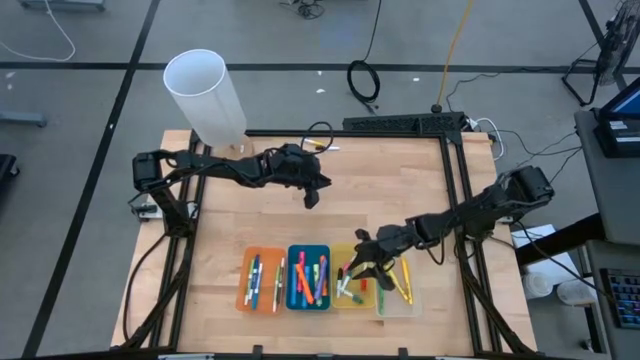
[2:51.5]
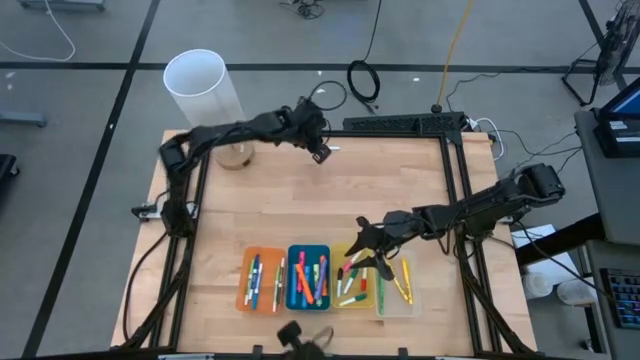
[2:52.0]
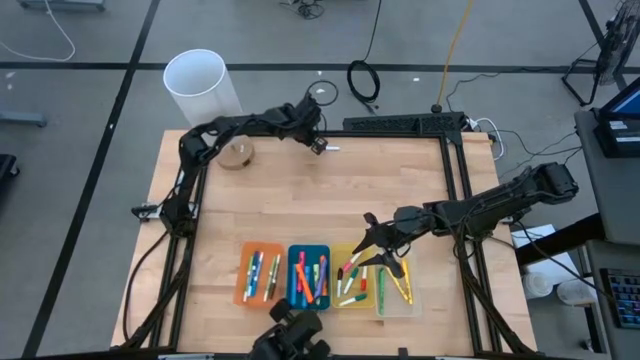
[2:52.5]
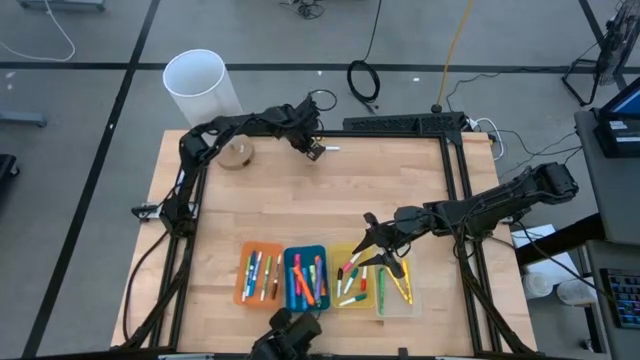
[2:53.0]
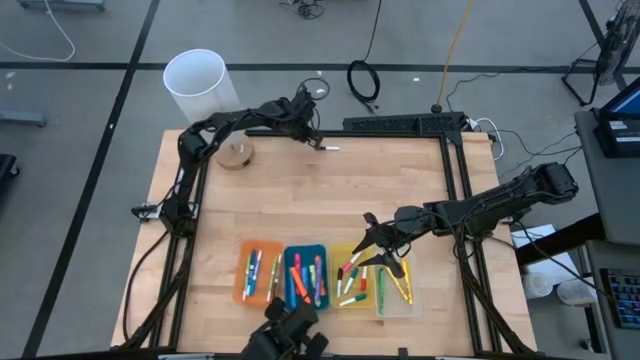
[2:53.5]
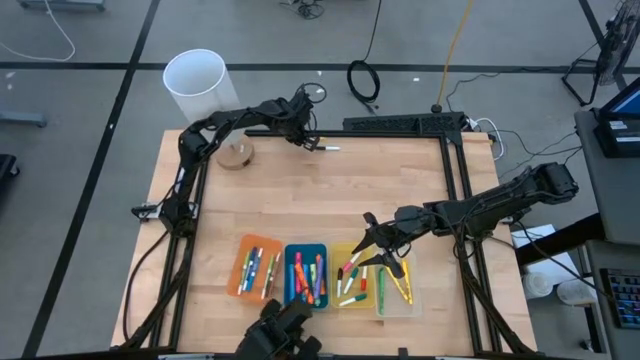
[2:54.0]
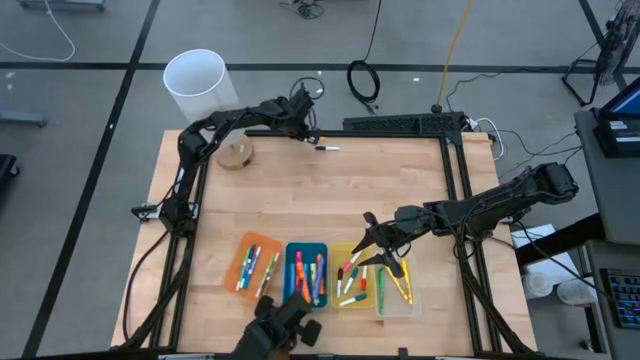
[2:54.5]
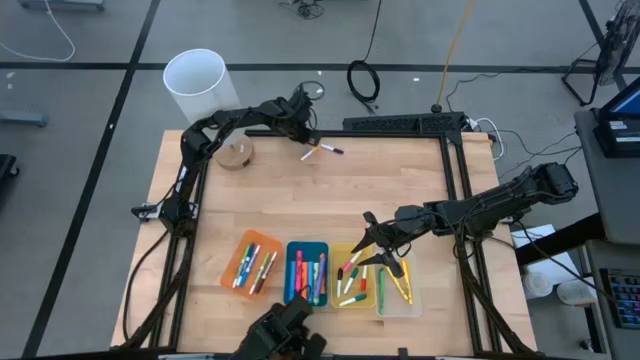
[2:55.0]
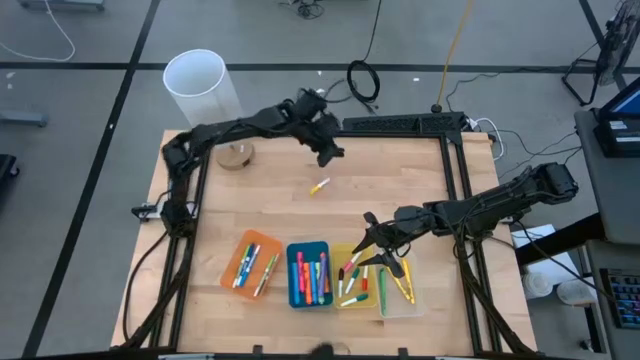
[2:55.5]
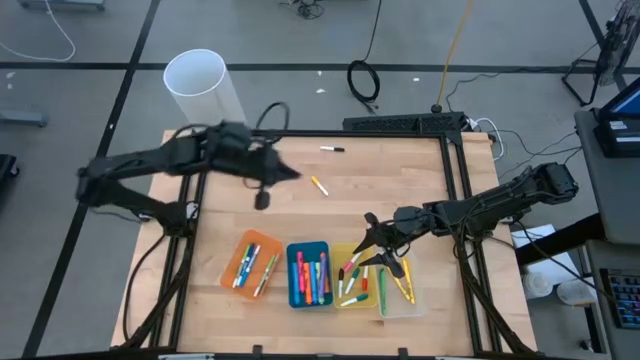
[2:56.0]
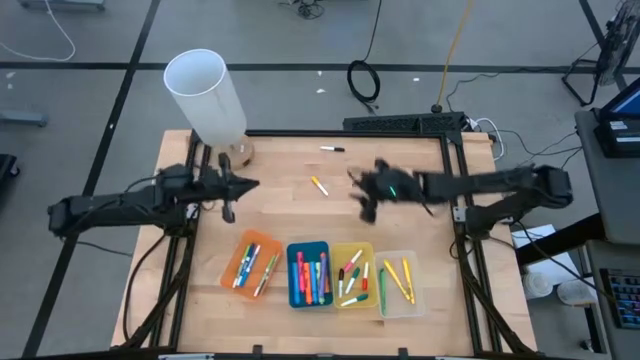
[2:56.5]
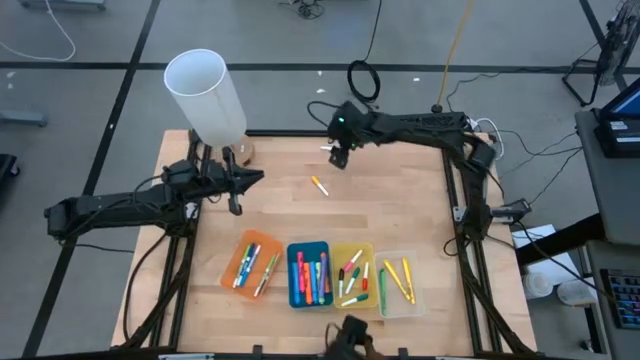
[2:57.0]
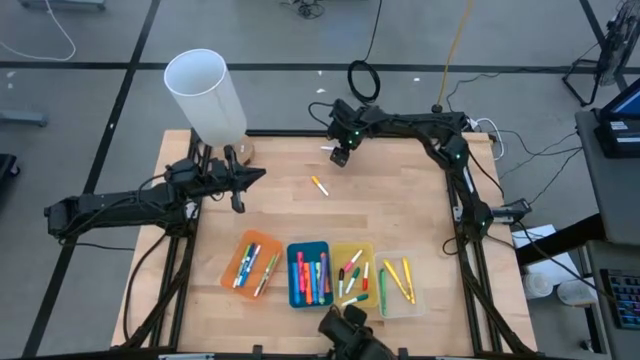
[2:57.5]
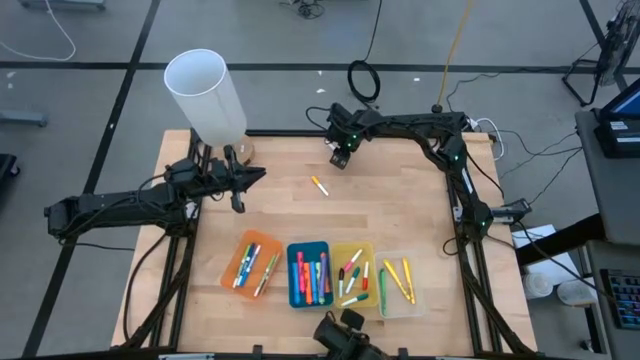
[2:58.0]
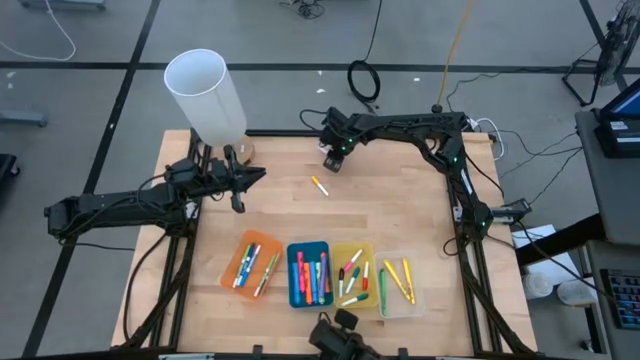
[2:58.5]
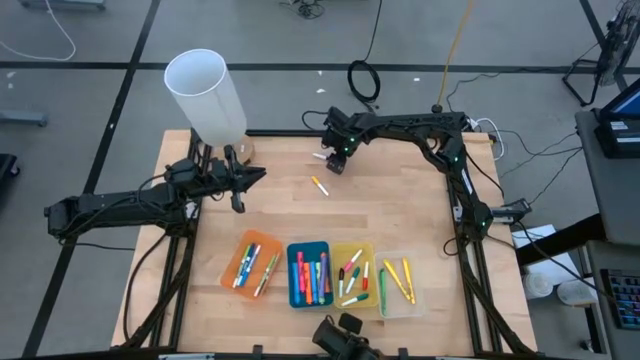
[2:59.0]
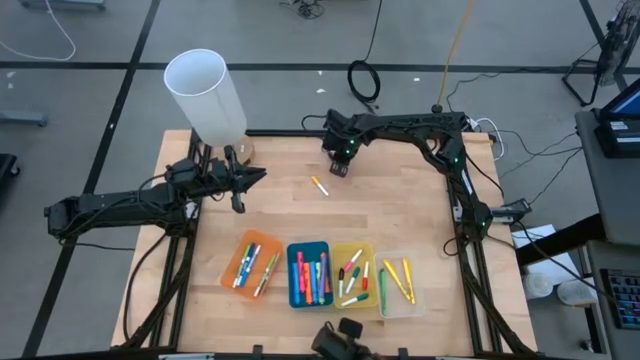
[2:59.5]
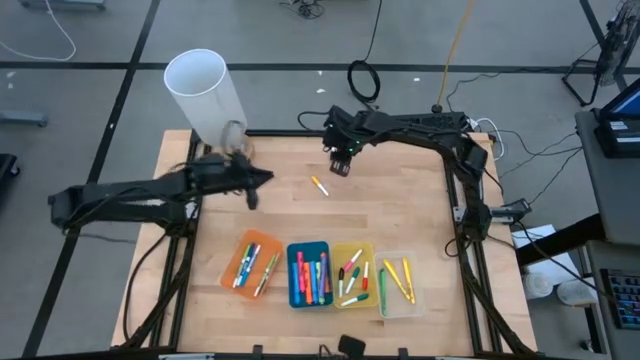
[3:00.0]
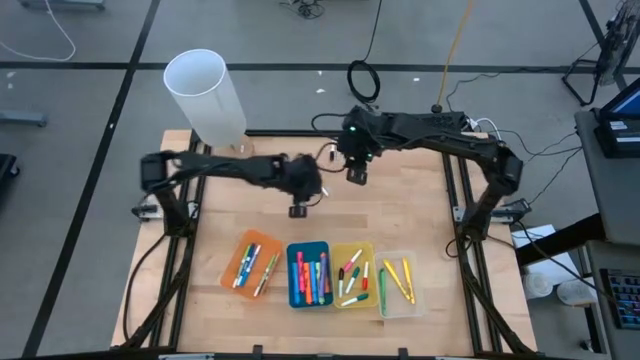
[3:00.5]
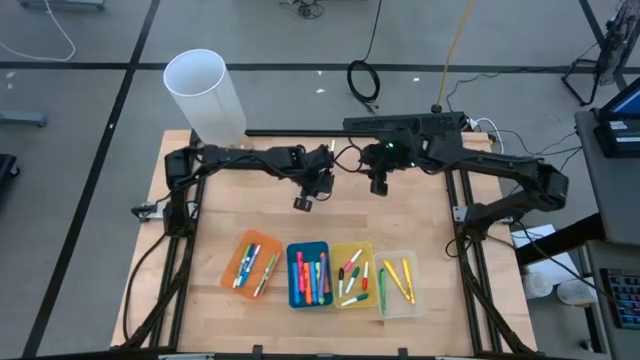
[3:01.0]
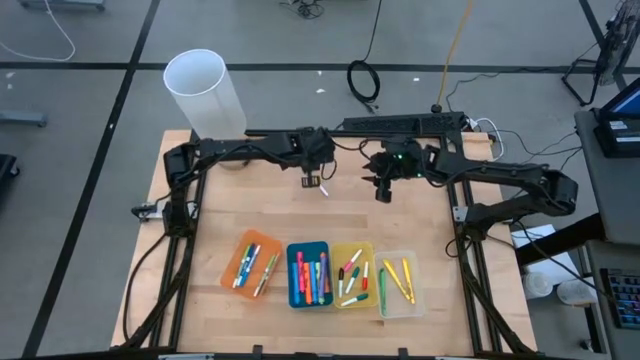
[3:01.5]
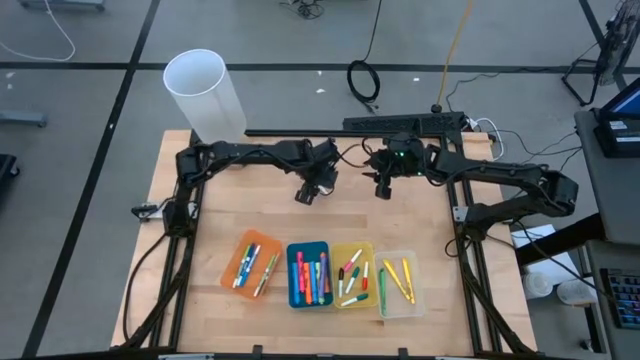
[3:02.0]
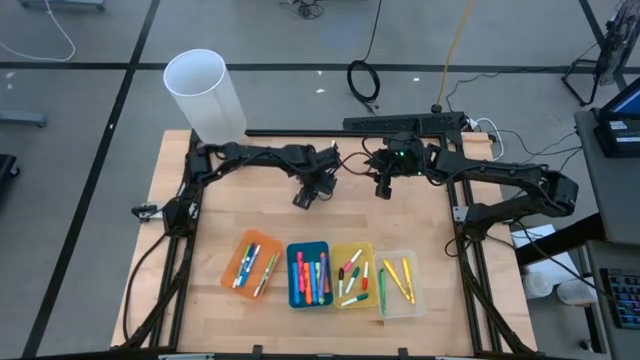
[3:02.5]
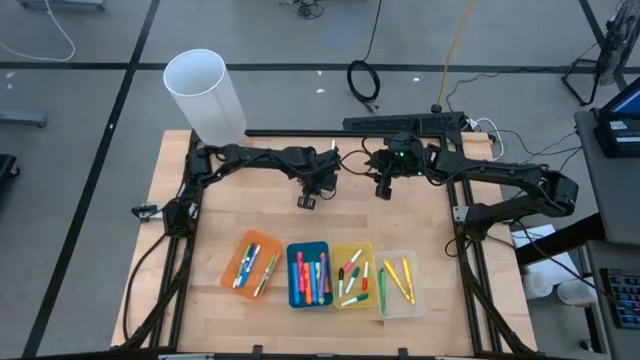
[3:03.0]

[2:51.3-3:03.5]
Task: Pick & Place Markers
Put the black highlighter pen into the yellow bin

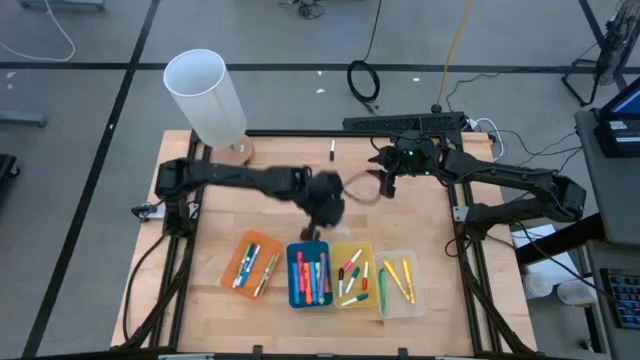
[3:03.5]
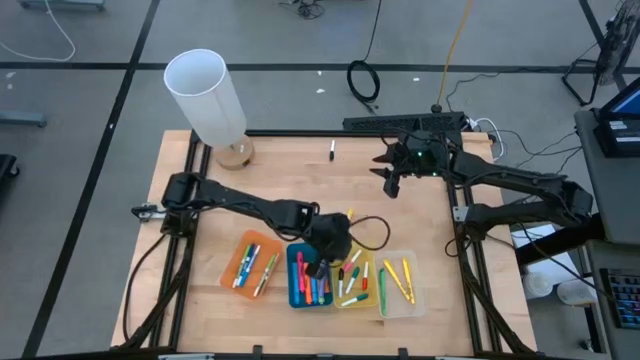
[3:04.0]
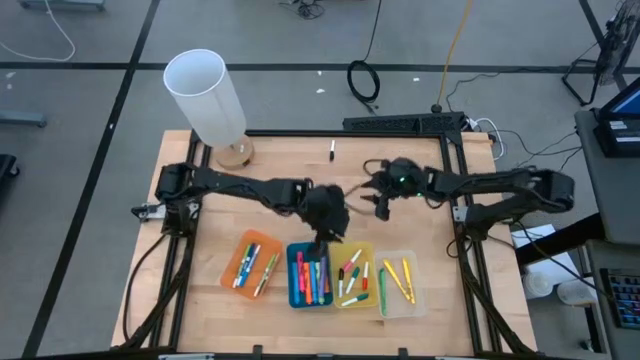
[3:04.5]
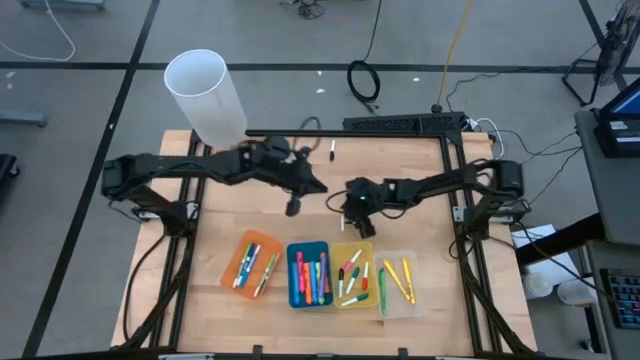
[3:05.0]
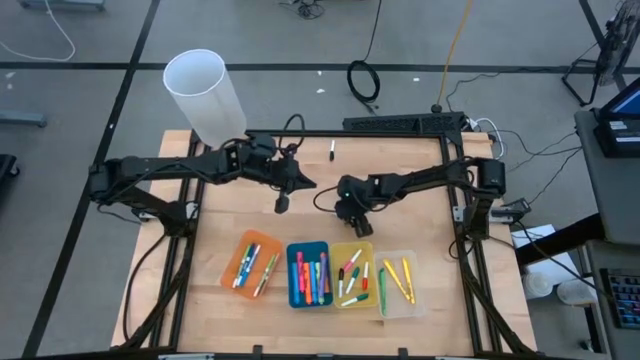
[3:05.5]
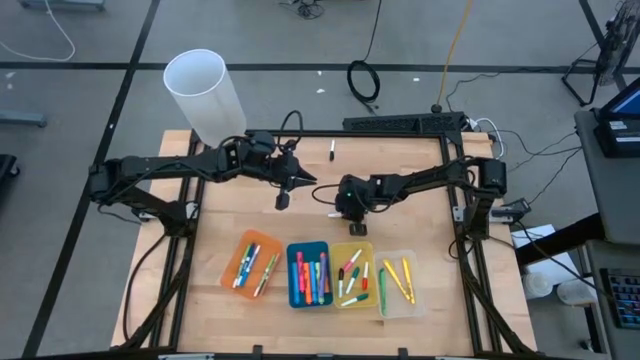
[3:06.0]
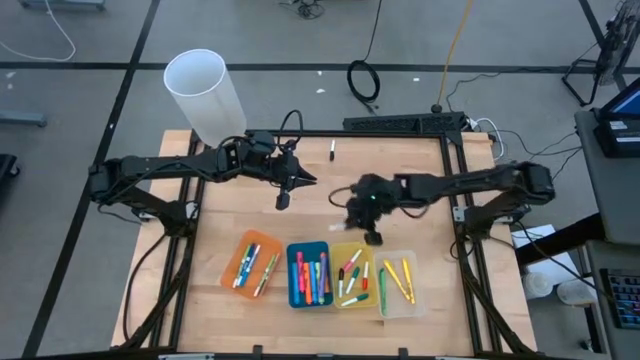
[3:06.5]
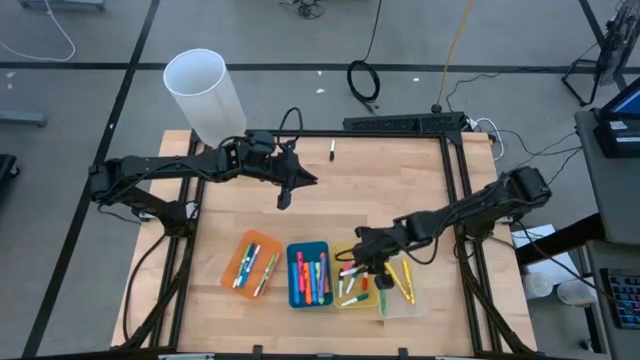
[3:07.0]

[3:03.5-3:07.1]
Put the yellow highlighter pen into the yellow bin

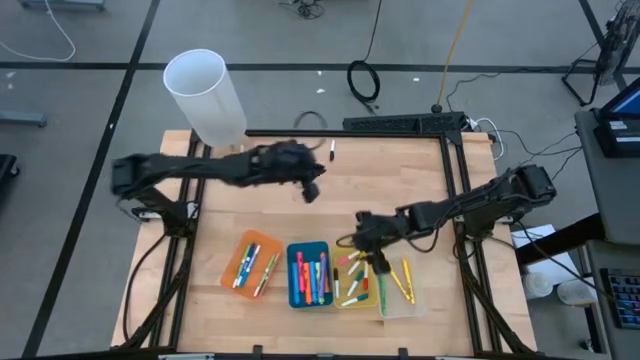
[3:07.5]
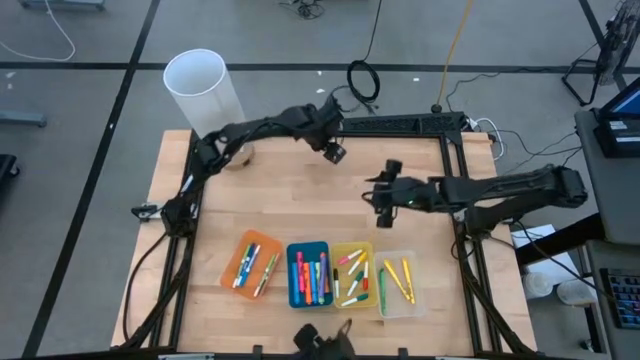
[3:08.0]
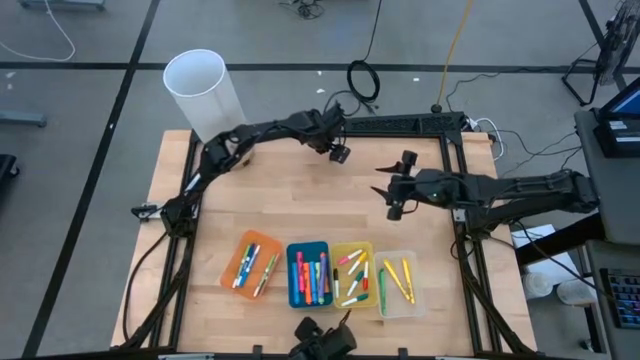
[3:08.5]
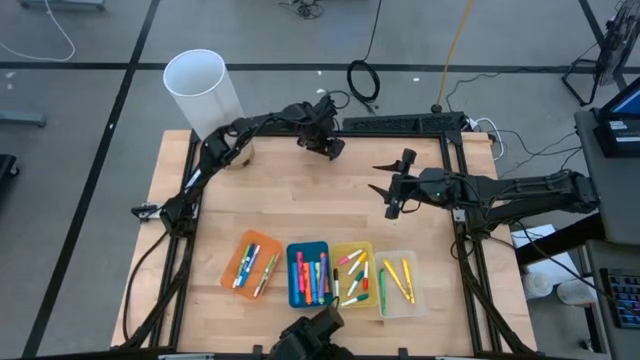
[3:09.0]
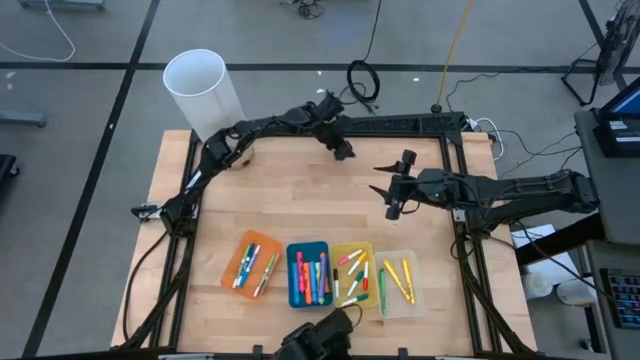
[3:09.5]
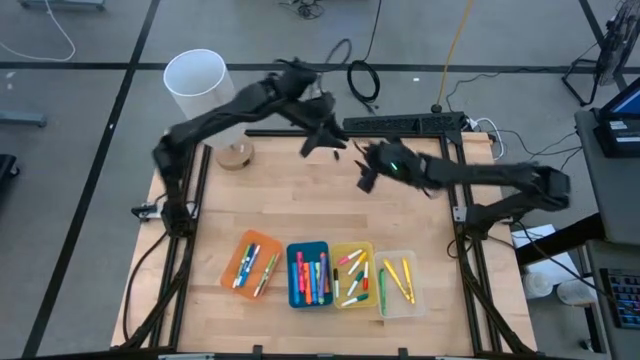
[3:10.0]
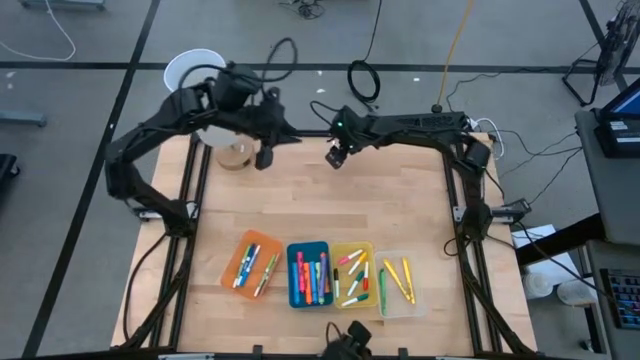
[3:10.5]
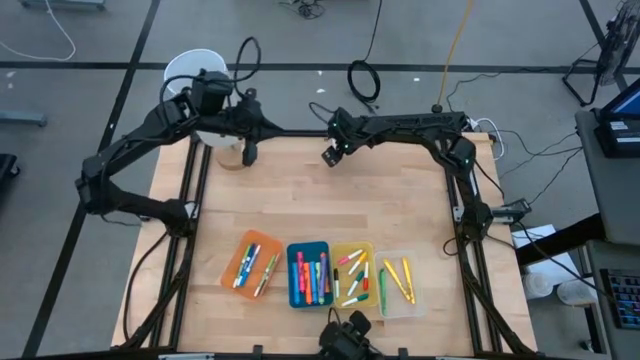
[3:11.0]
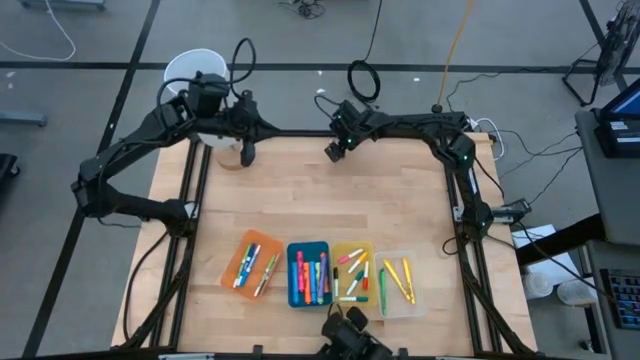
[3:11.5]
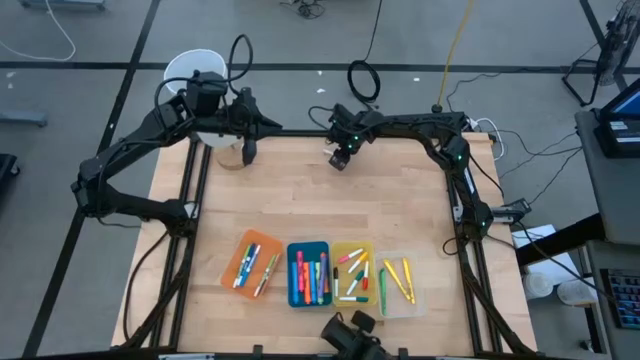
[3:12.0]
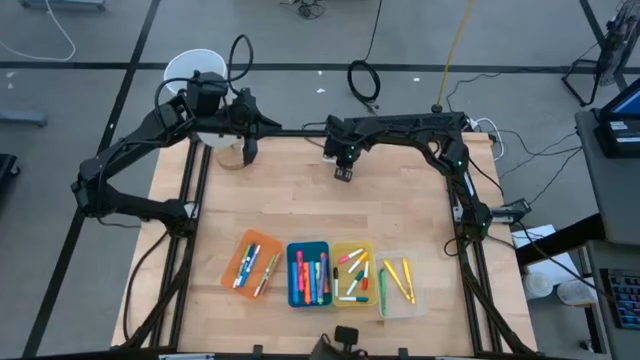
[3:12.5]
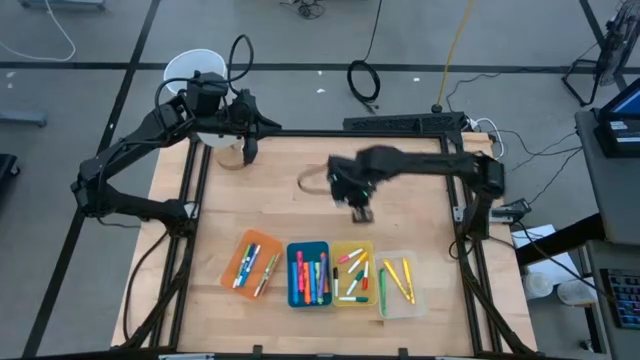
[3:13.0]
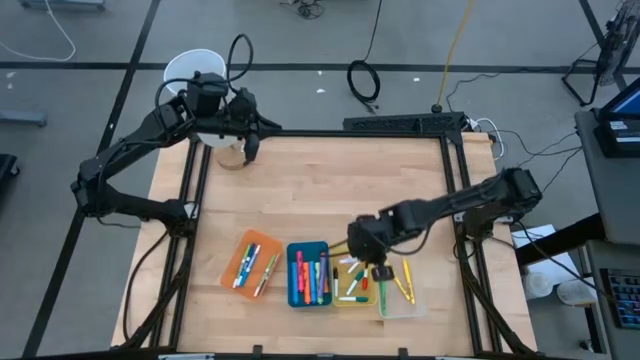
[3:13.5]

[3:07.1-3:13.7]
Put the black highlighter into the yellow bin
